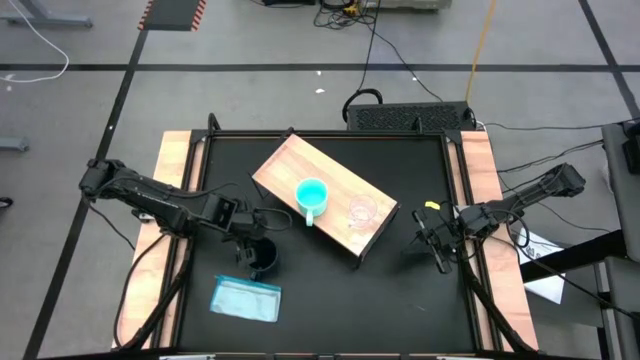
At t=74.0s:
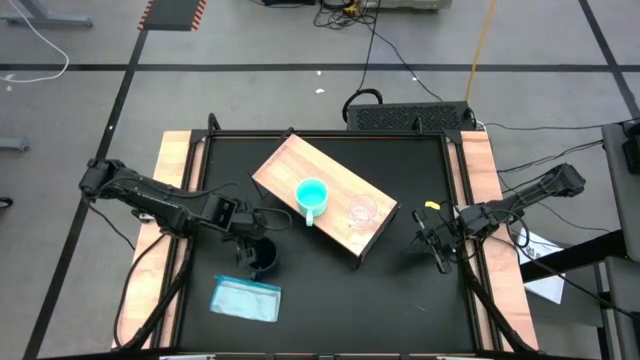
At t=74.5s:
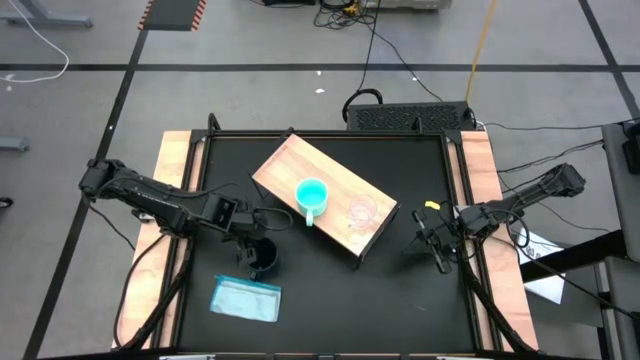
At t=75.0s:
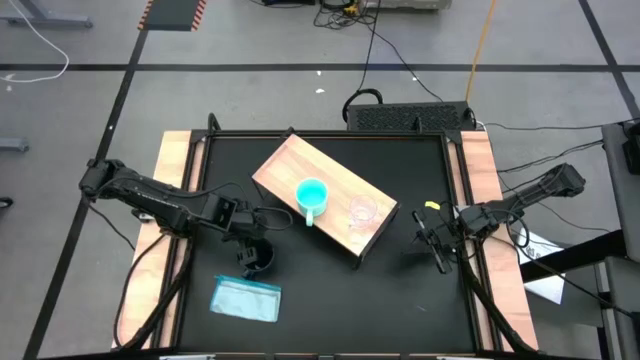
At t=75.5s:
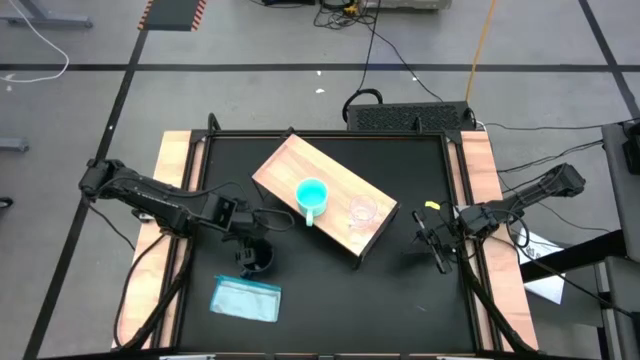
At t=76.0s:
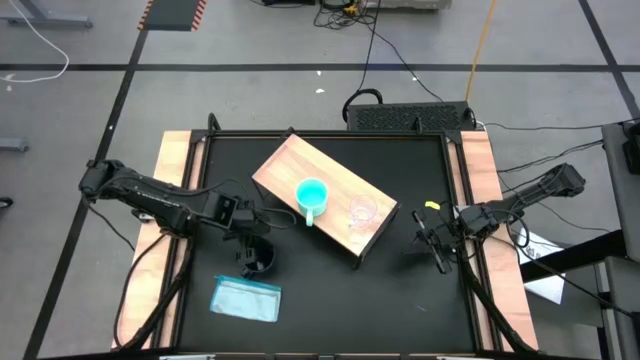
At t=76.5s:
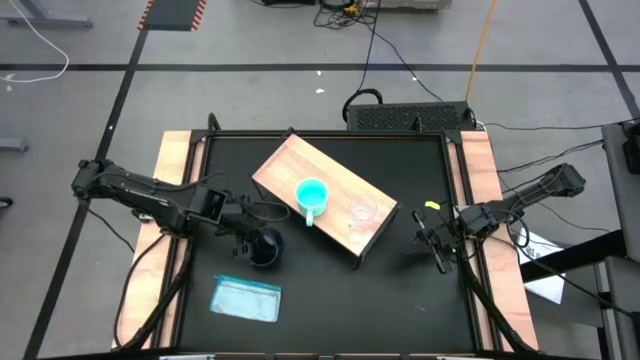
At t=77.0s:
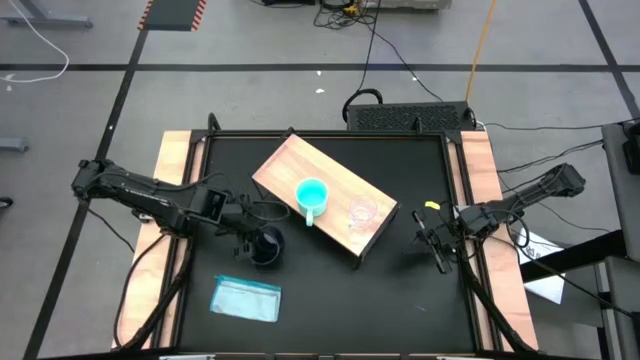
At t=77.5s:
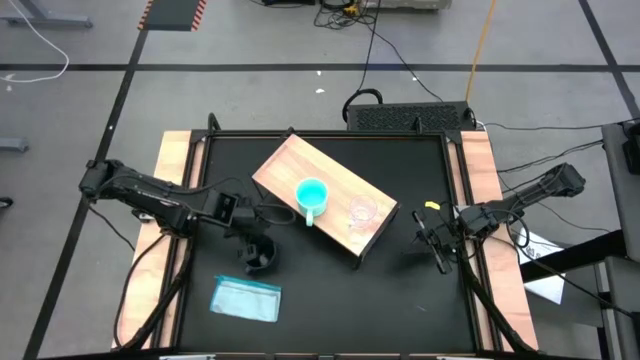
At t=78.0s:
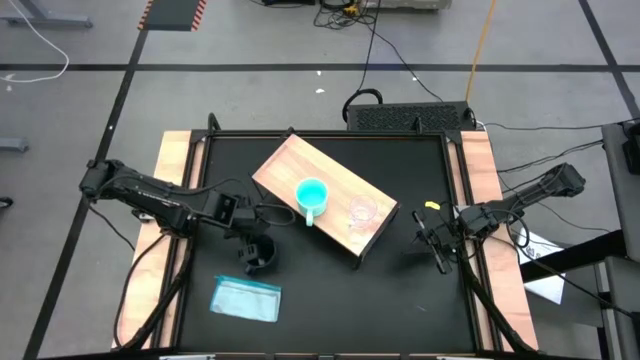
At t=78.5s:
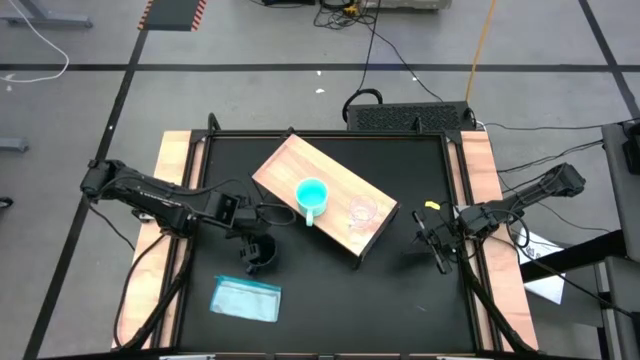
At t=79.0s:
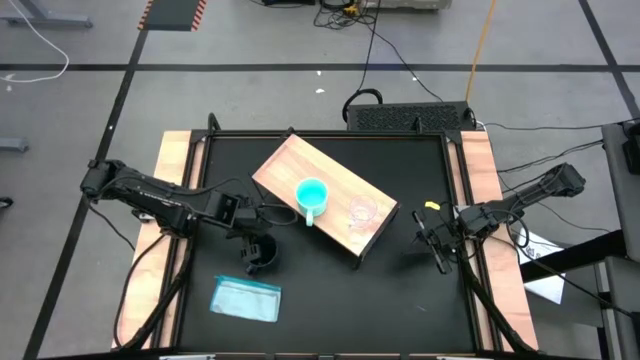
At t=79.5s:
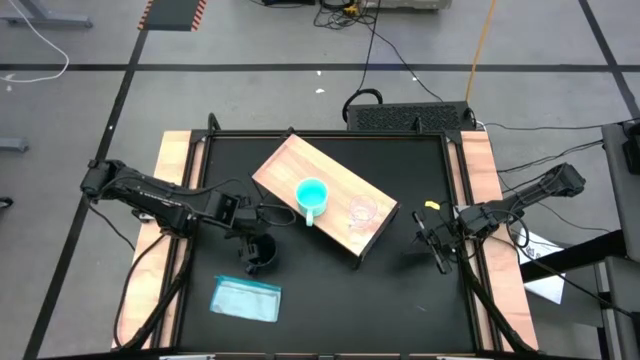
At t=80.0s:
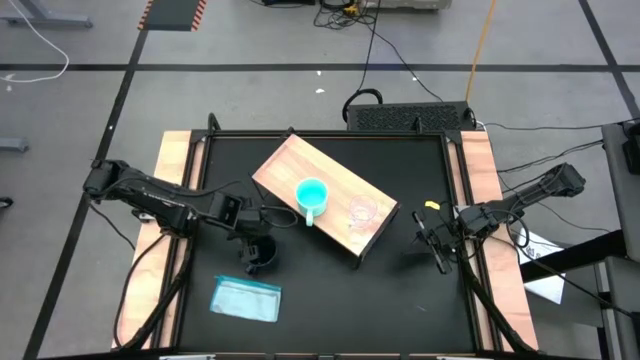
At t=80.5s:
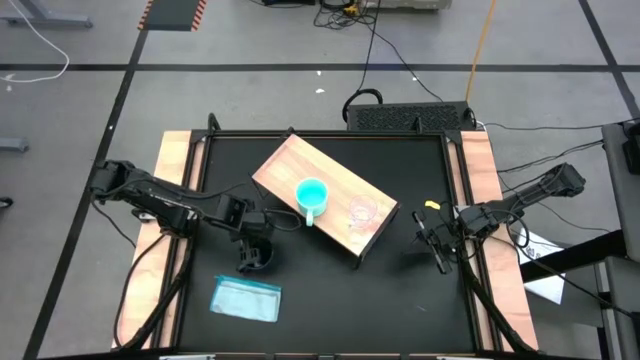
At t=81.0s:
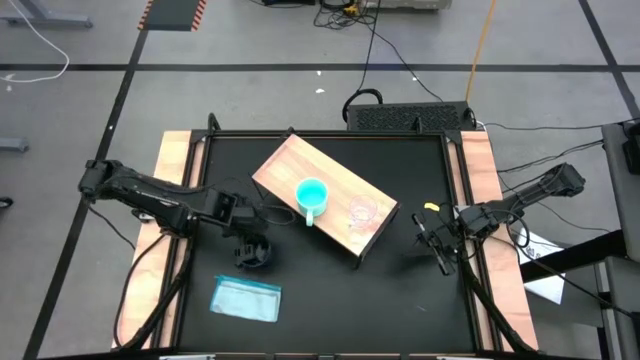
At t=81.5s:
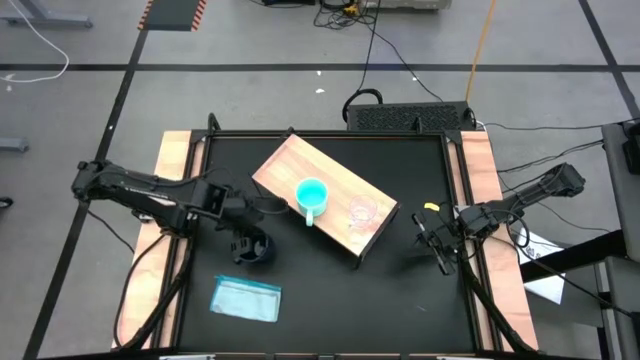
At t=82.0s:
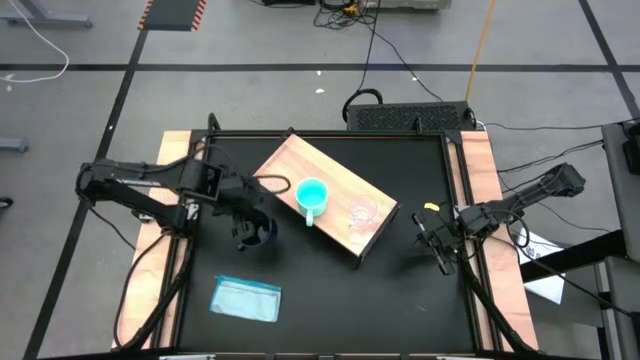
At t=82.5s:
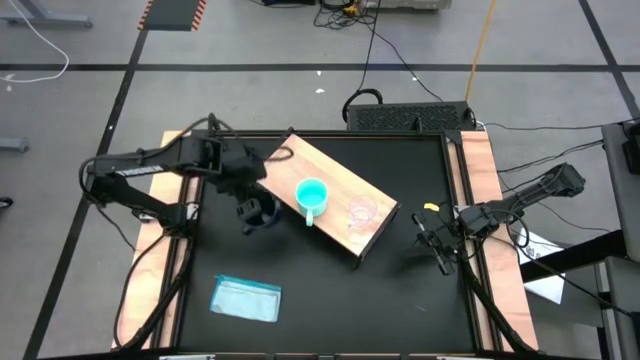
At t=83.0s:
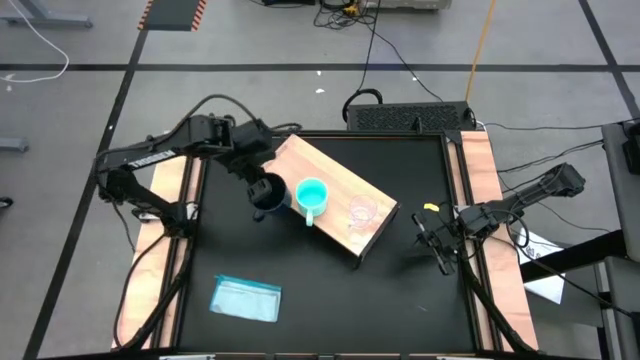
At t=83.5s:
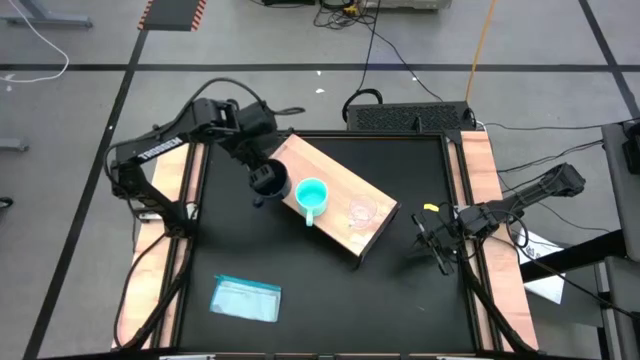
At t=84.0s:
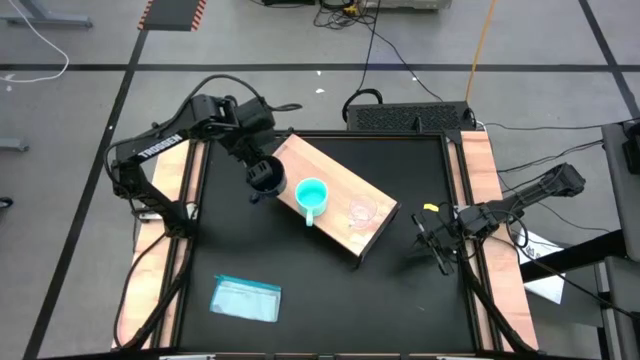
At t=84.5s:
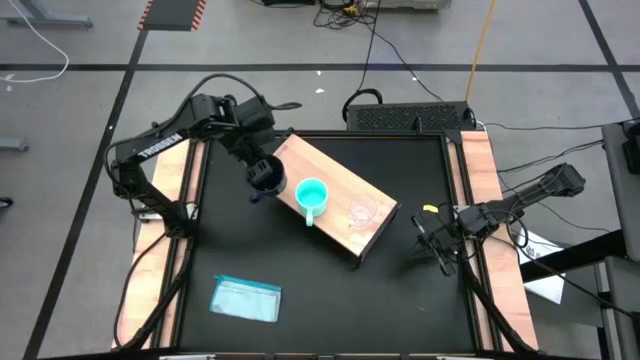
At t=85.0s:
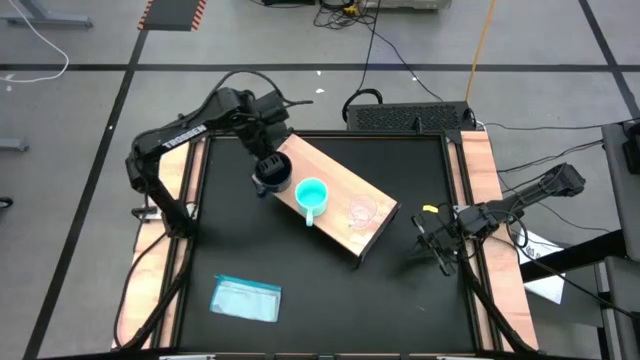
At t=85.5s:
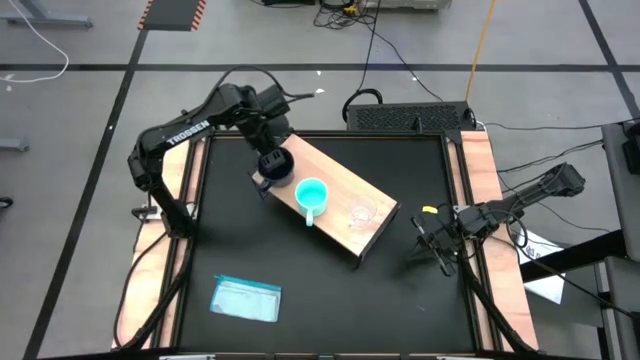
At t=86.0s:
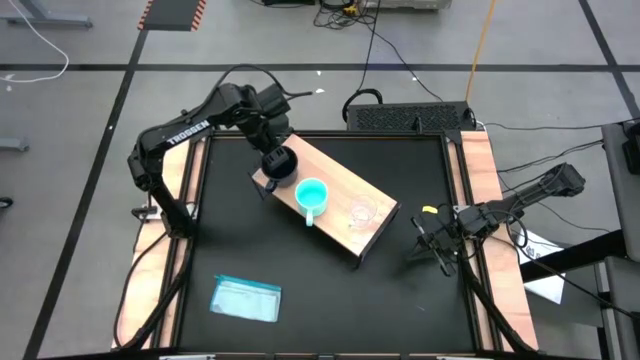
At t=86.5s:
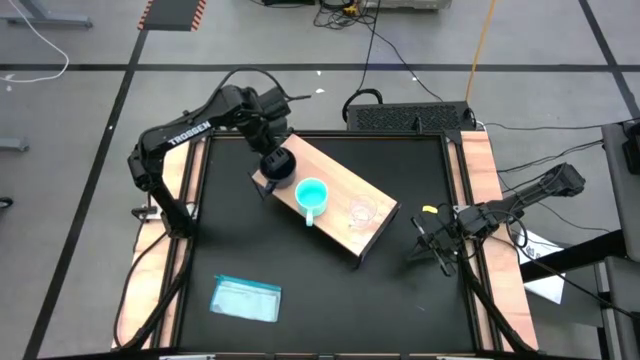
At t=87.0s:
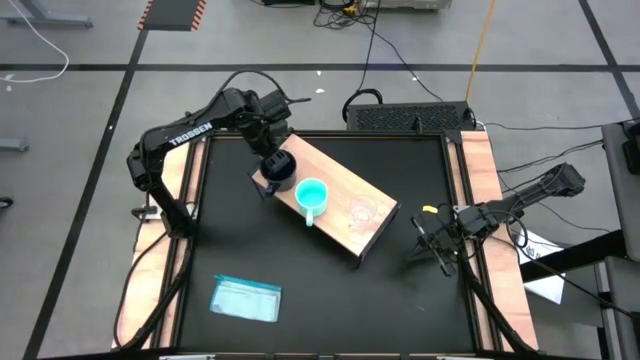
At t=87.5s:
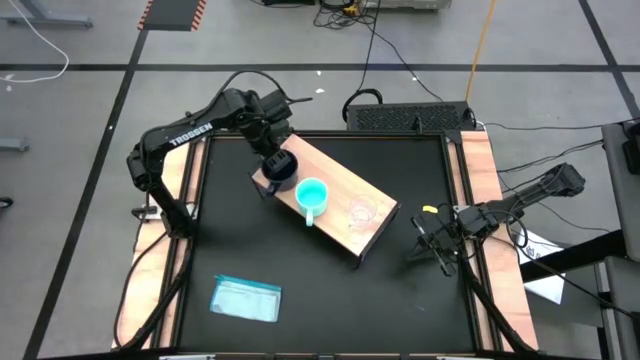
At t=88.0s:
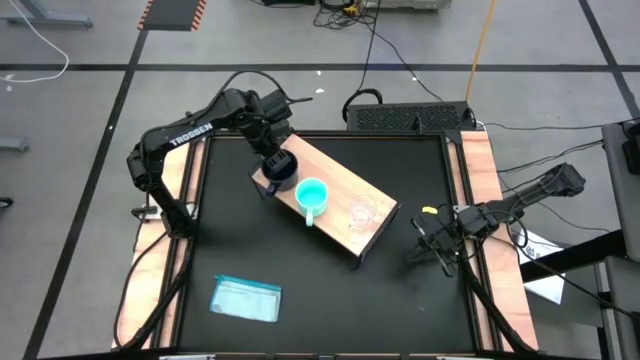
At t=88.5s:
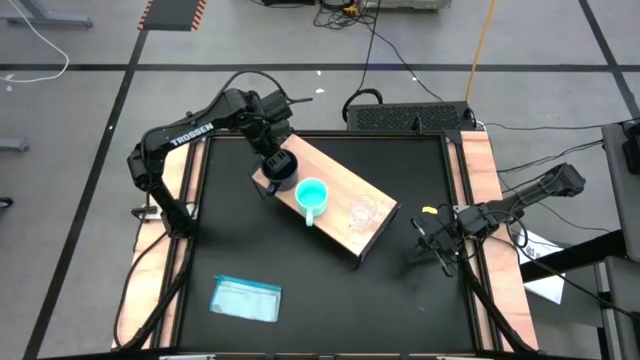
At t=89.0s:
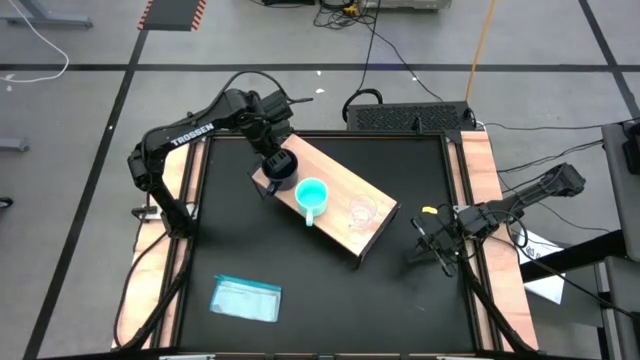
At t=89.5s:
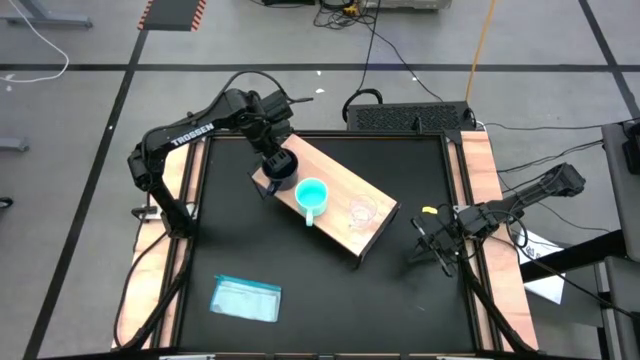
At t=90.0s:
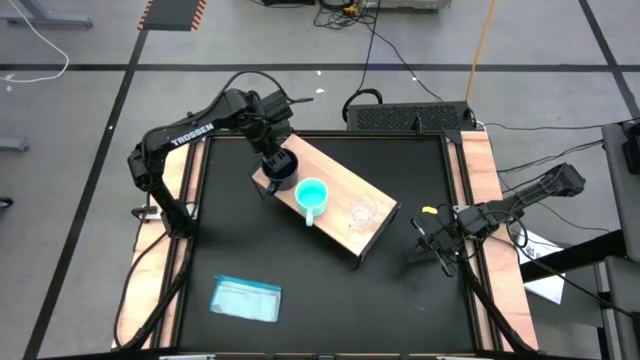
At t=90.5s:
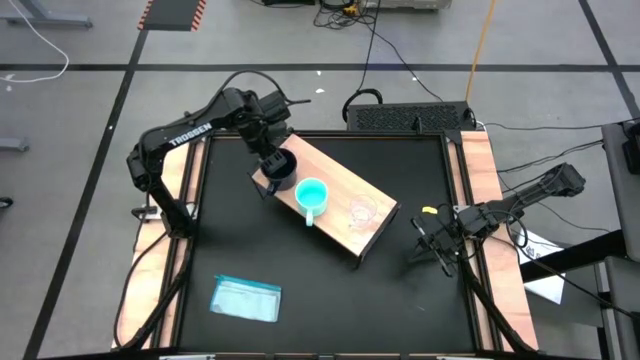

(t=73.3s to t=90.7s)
Task: Stack small to large cups/mugs on shelf
Put the dark blue mug on the shelf

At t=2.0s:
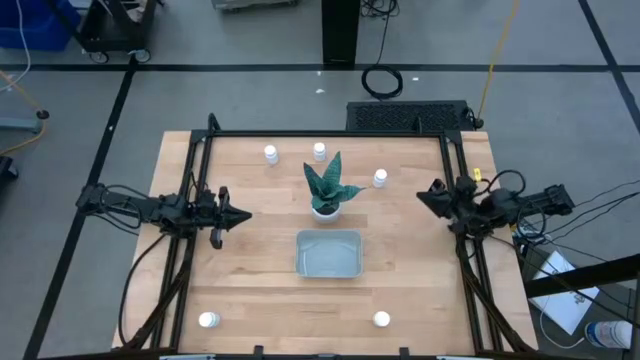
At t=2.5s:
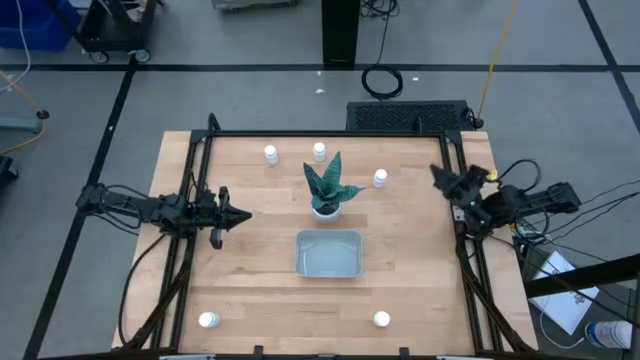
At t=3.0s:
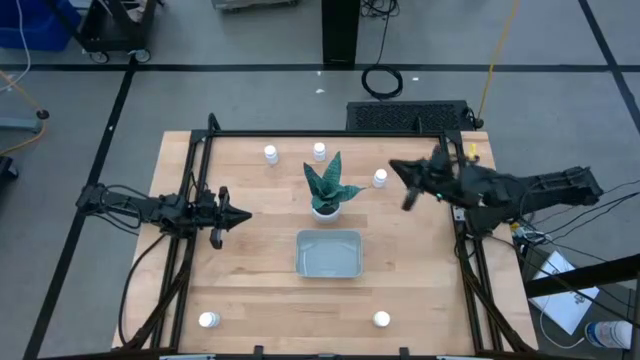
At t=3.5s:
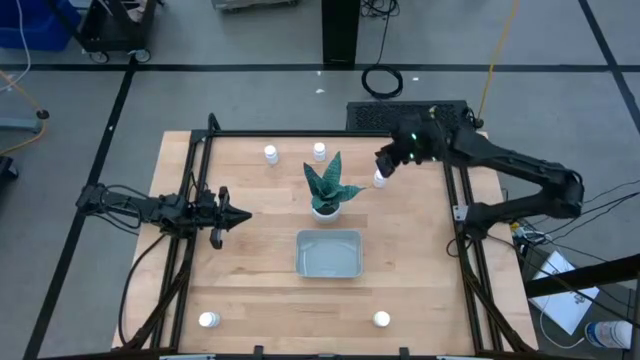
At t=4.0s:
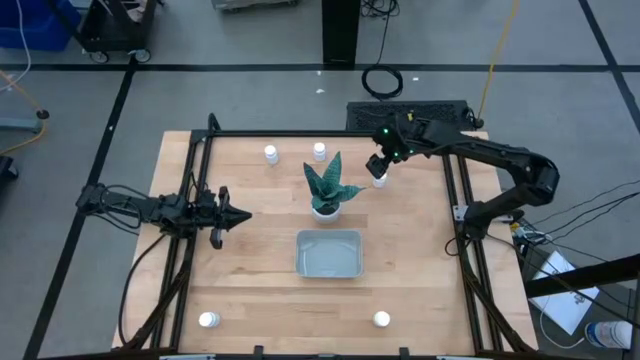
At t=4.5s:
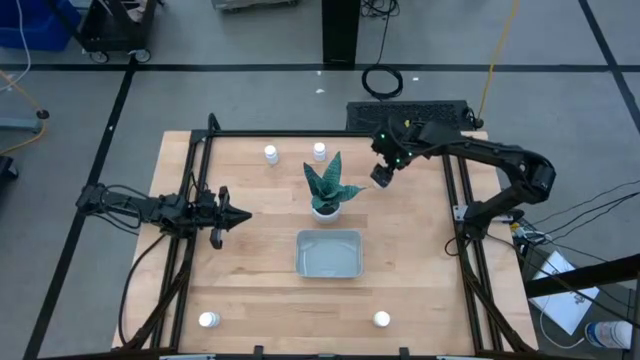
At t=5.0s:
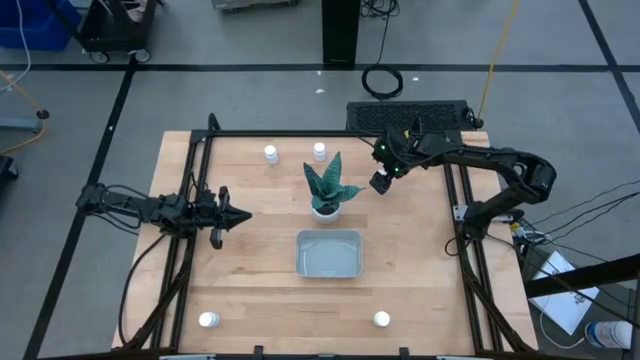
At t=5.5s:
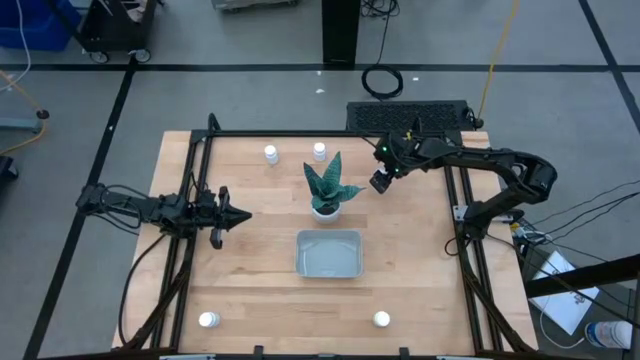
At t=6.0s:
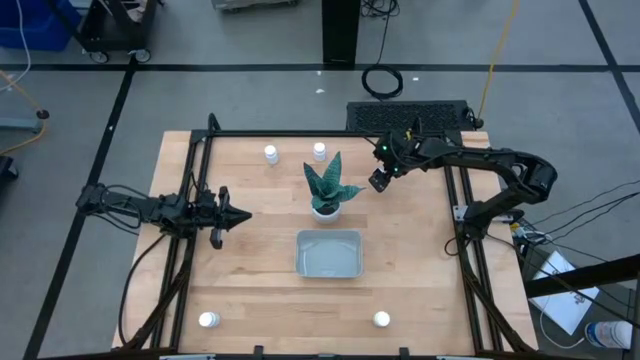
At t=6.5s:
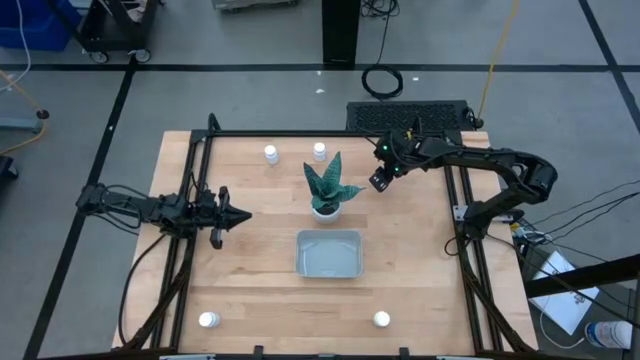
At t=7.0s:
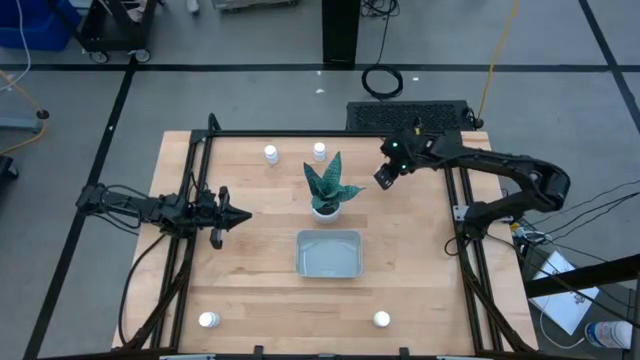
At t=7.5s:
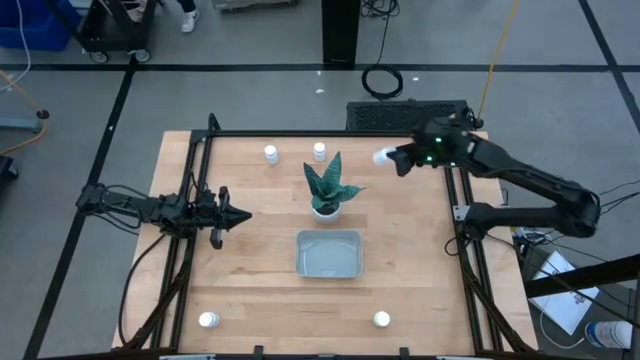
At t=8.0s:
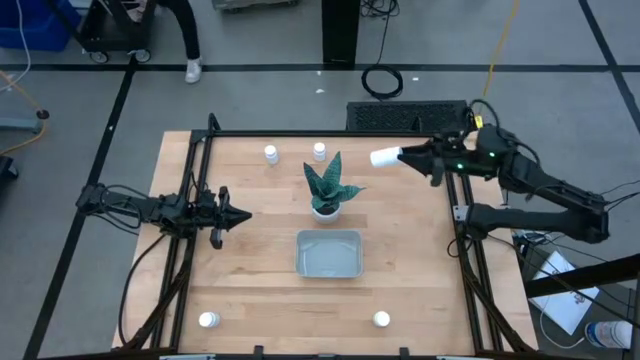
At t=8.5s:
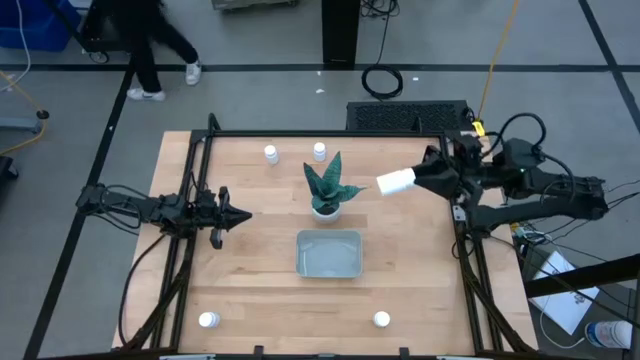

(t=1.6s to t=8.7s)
Task: Pick and place pill bottles into a basket
Put the white pill bottle into the gray bin
